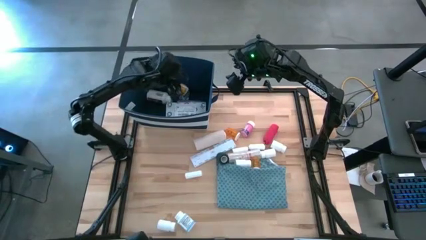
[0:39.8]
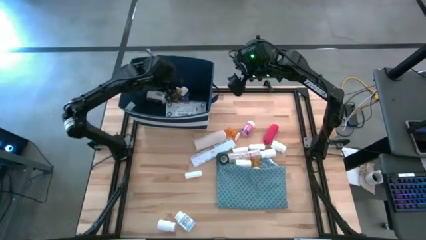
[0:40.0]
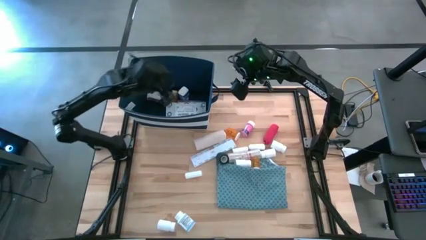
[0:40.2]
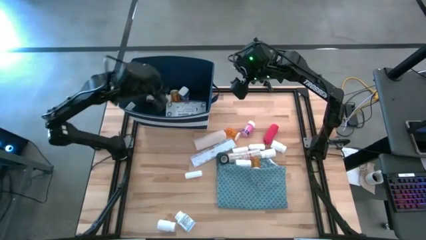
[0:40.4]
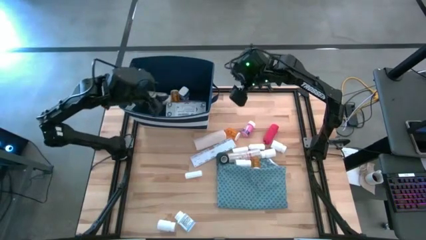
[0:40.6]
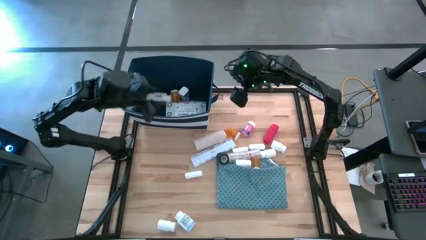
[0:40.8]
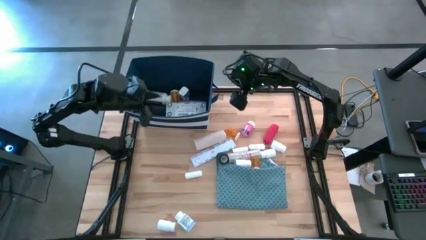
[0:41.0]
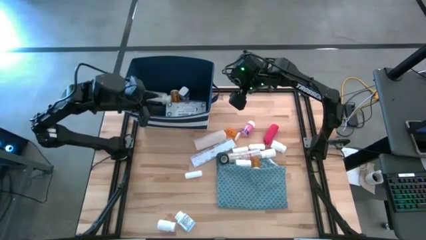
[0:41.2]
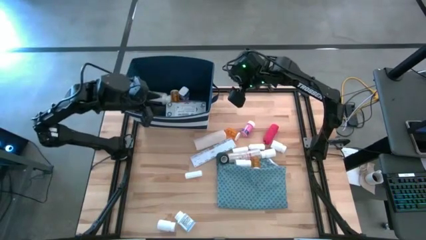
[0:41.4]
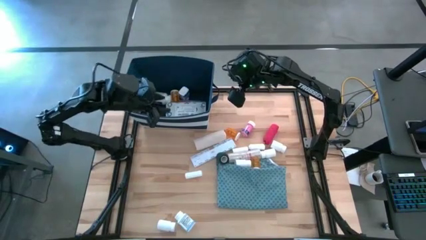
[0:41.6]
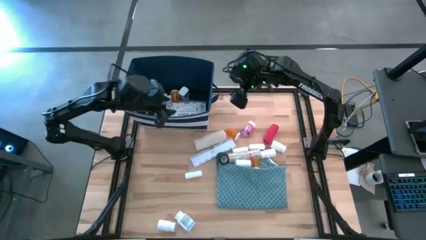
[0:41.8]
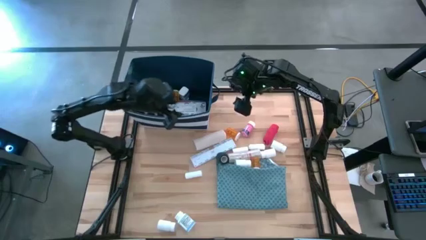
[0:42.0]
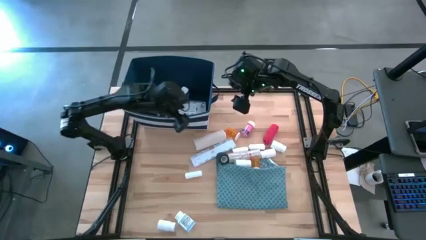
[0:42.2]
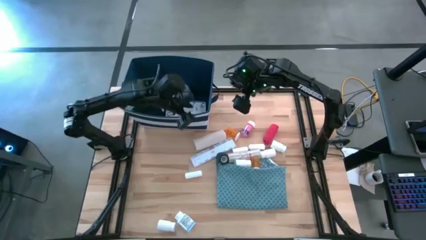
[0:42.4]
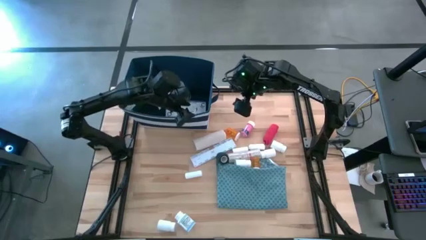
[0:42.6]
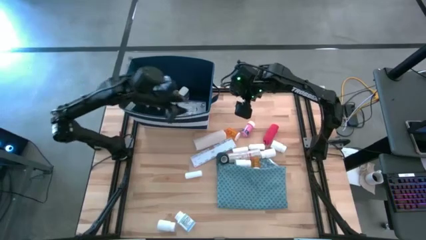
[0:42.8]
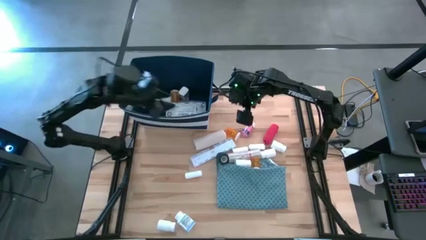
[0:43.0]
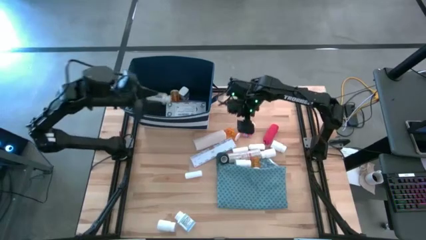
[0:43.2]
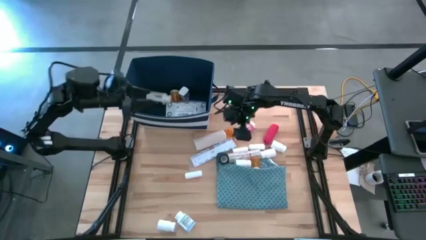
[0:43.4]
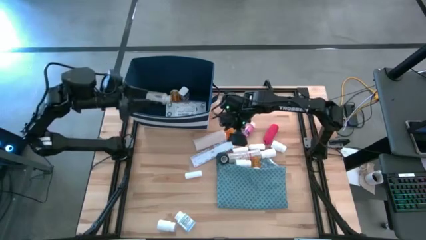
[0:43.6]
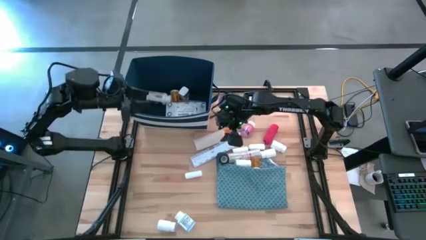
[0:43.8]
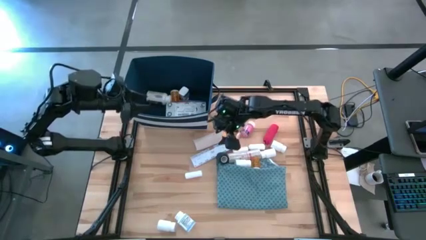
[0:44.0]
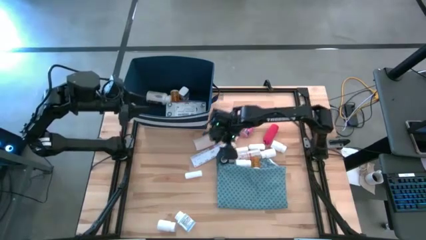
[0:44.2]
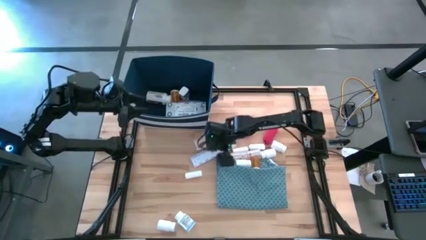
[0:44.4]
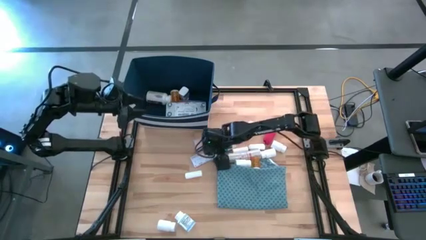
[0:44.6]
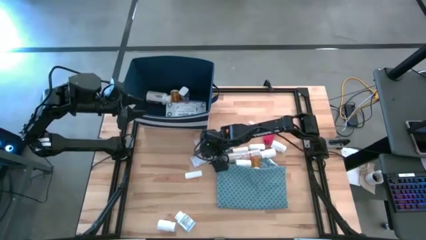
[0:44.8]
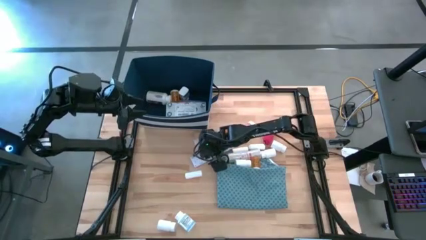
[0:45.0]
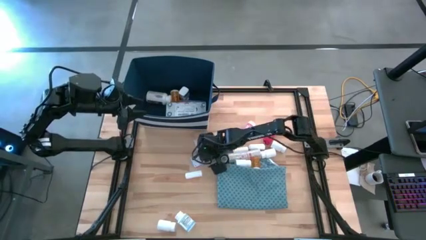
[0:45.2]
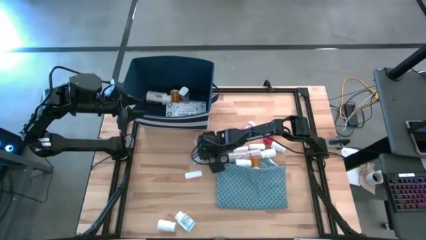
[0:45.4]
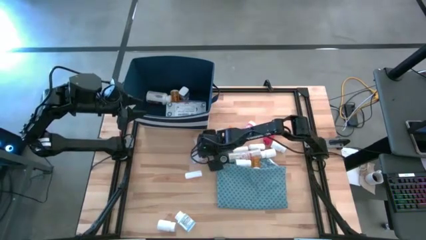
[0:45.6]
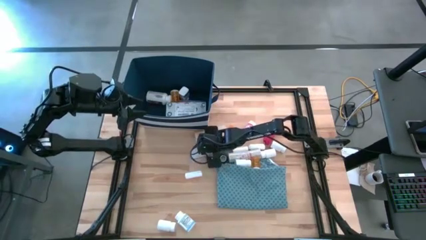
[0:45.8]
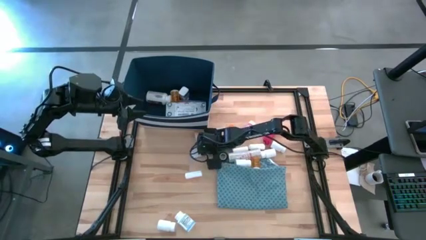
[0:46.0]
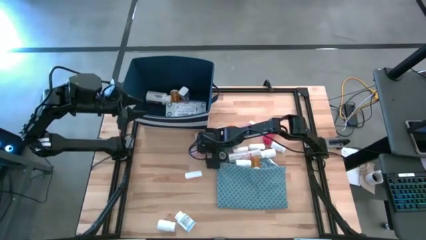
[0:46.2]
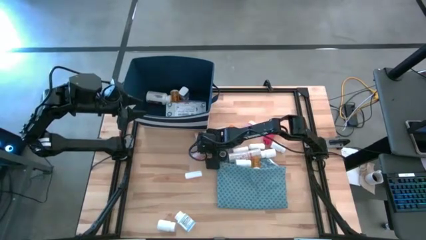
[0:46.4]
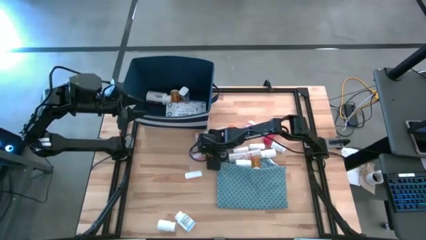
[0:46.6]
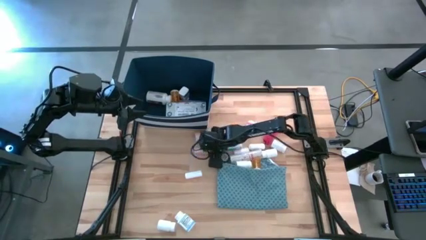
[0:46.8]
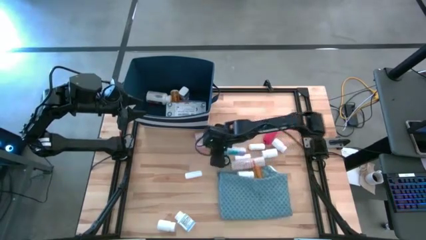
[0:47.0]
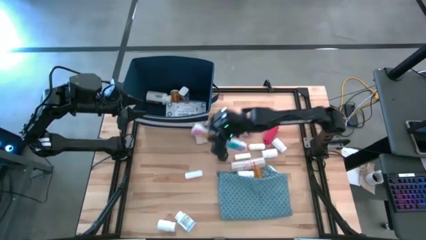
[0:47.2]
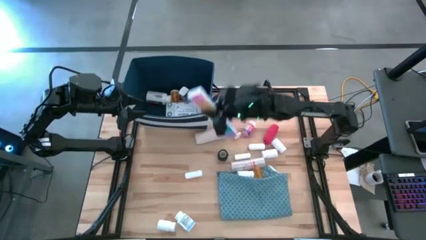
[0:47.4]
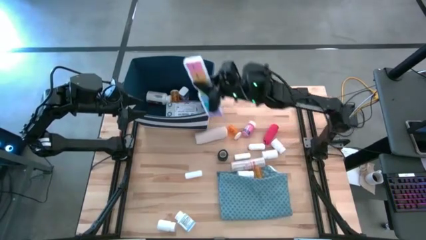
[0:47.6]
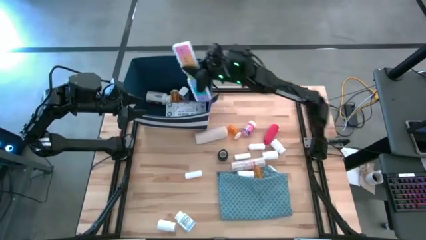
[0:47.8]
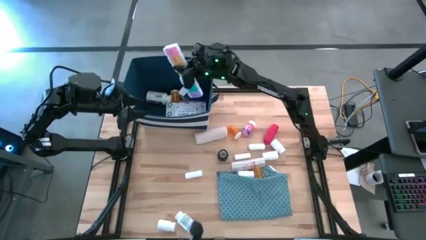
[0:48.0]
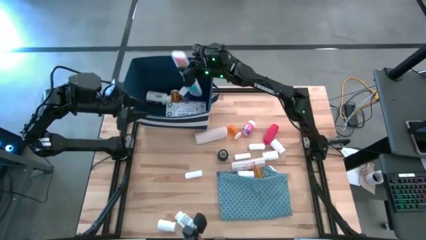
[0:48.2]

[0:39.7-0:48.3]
Task: Pick & place medical supplies in basket/bin
Put the white medicine organizer into the blue bin

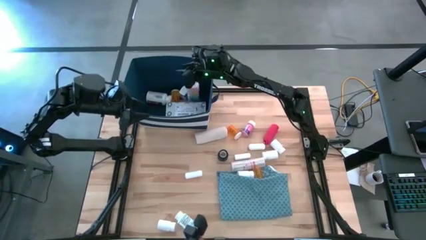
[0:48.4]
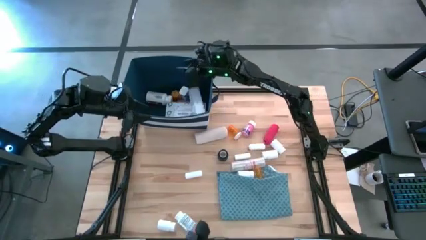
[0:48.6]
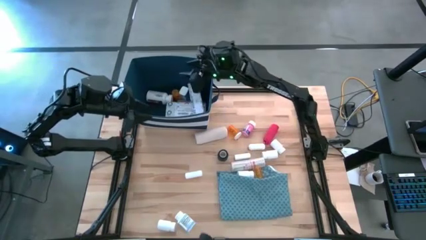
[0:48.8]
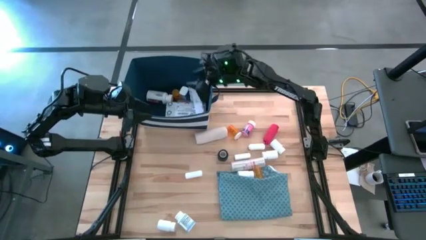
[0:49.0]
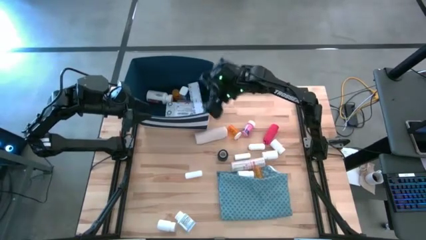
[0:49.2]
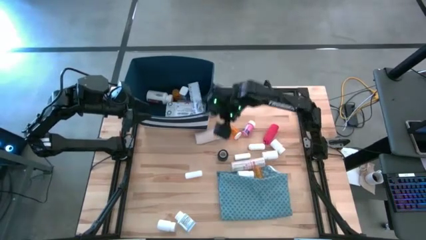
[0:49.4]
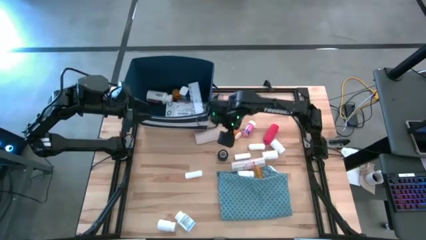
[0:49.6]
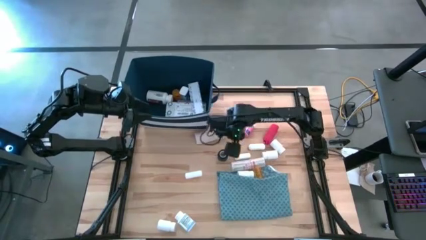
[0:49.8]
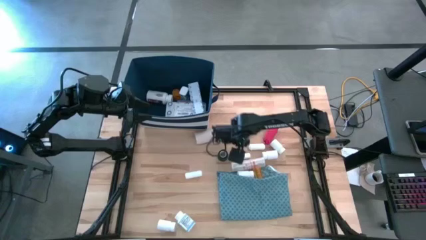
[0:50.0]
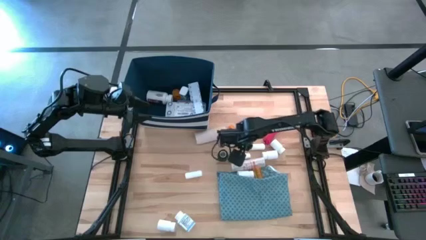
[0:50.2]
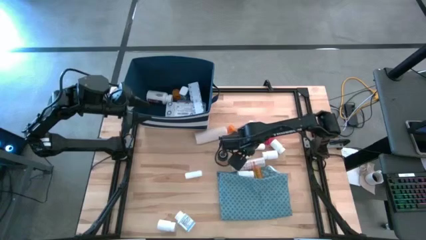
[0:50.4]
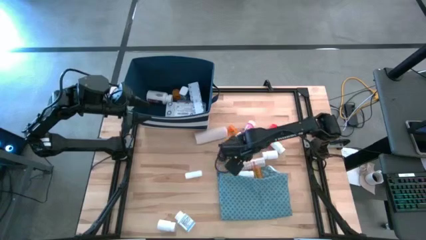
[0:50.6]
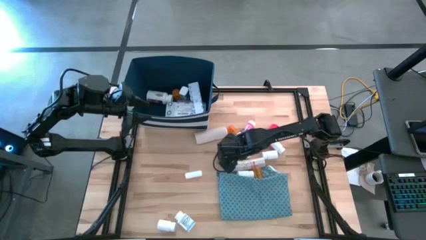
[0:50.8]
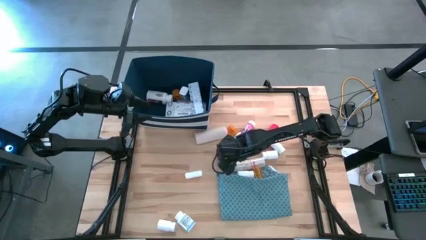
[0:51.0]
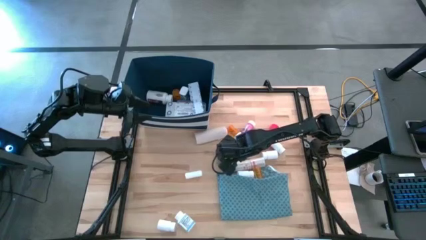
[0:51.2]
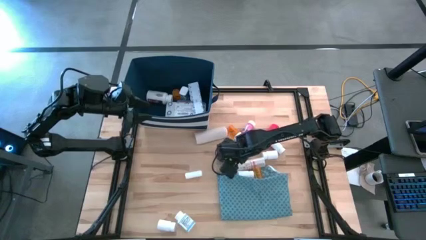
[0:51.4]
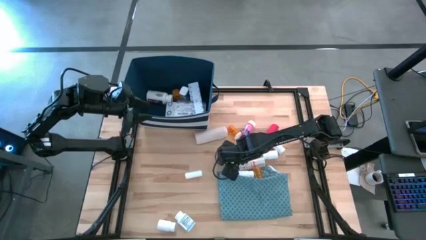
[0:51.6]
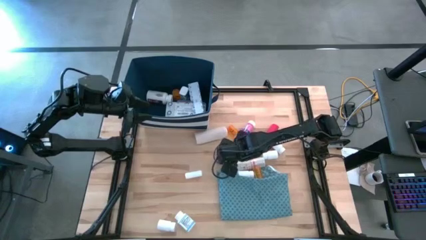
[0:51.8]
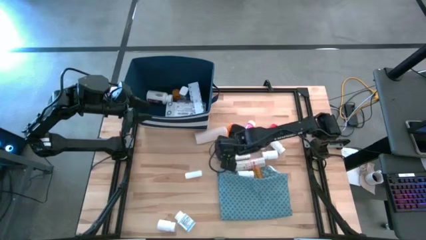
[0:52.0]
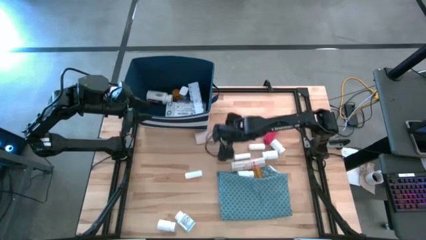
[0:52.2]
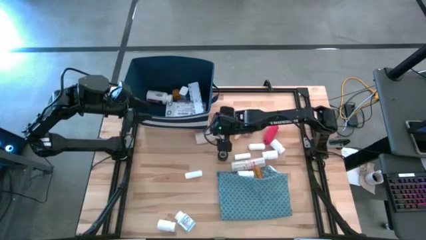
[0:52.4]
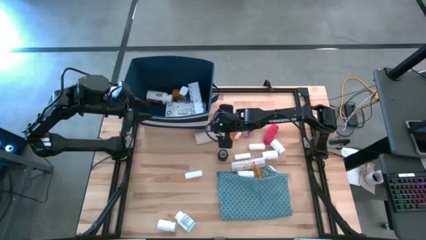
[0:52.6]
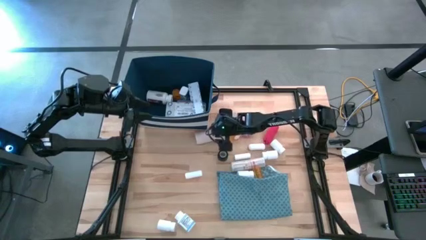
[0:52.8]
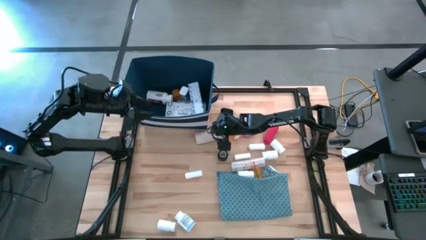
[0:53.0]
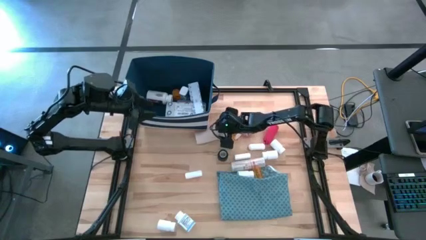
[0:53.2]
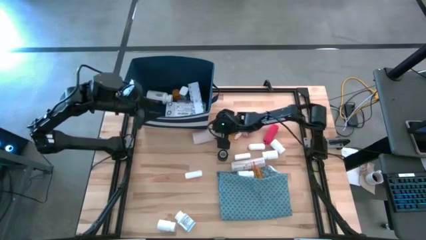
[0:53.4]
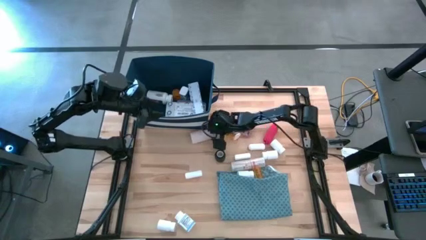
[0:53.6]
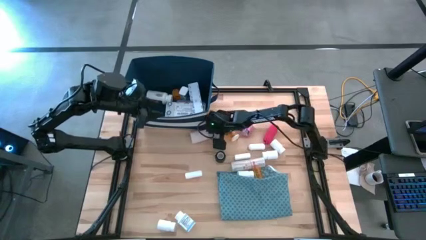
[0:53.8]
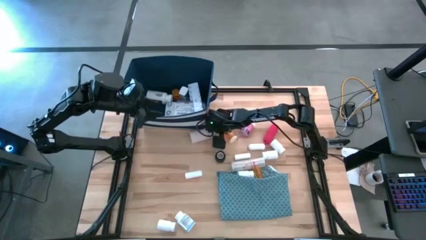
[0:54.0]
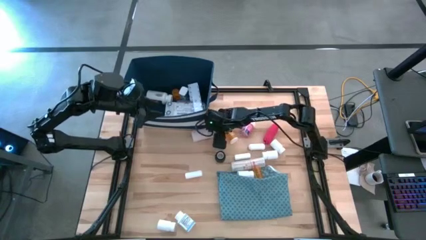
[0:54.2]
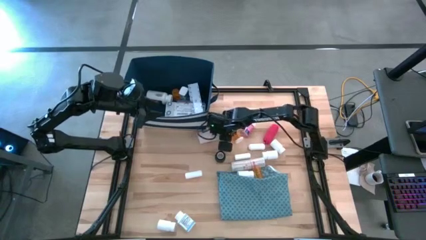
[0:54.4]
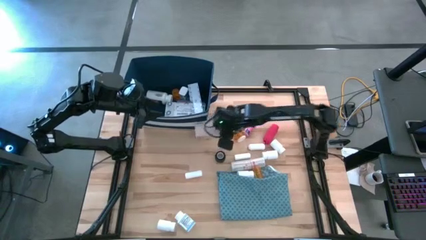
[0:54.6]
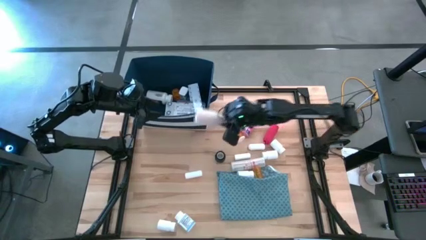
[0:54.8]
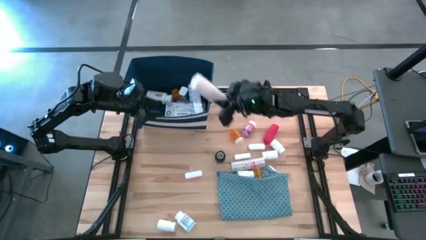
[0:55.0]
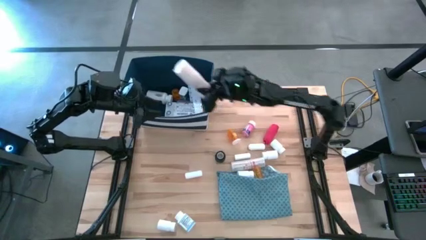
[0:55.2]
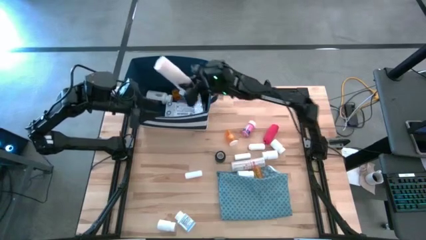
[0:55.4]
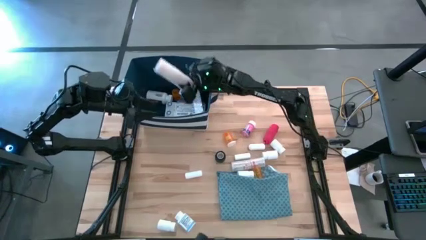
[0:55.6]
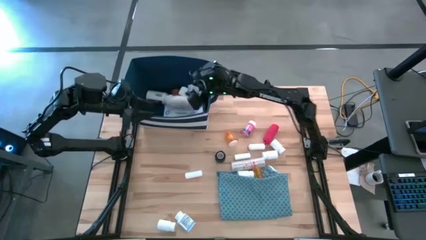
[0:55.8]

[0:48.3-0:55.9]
Put the light brown bandage into the blue bin
